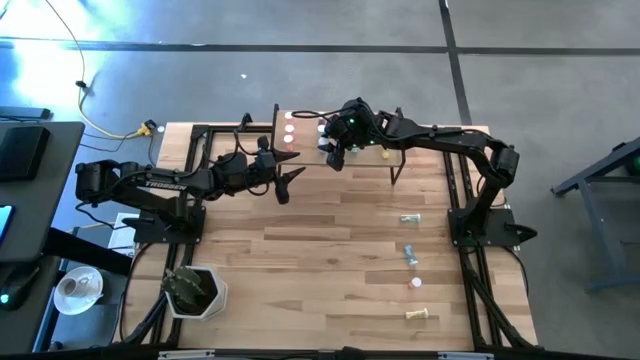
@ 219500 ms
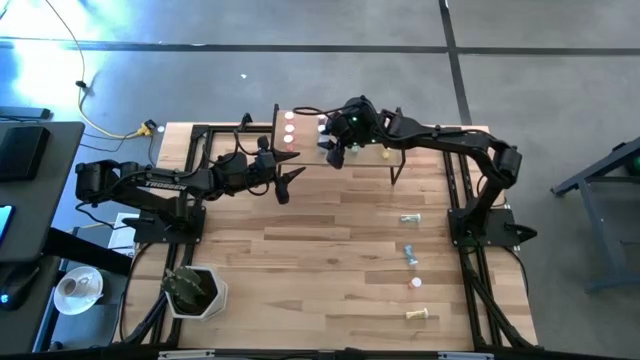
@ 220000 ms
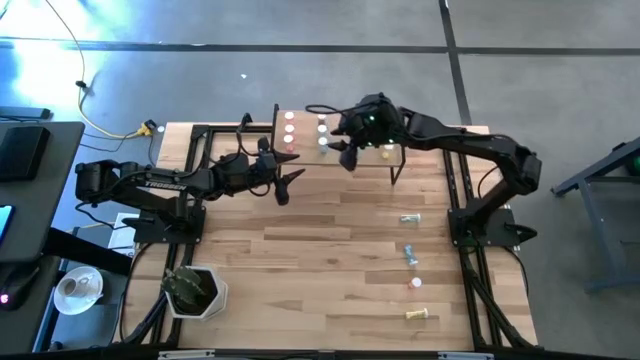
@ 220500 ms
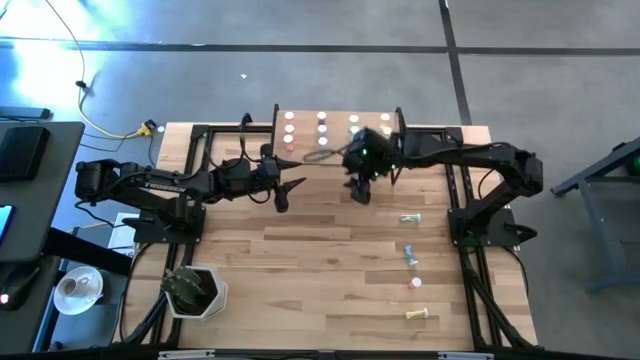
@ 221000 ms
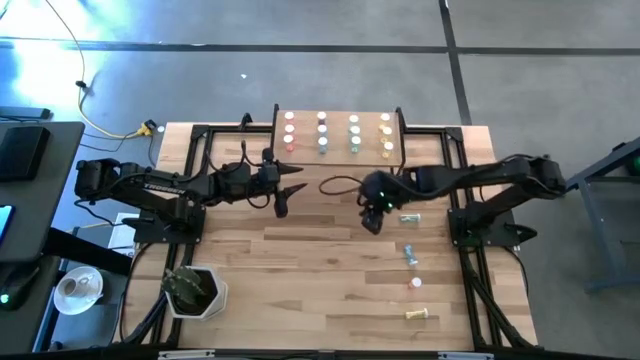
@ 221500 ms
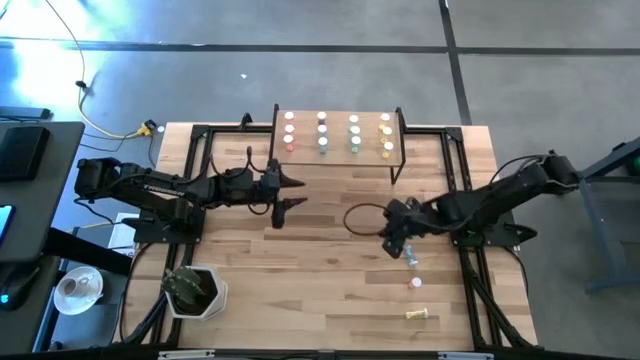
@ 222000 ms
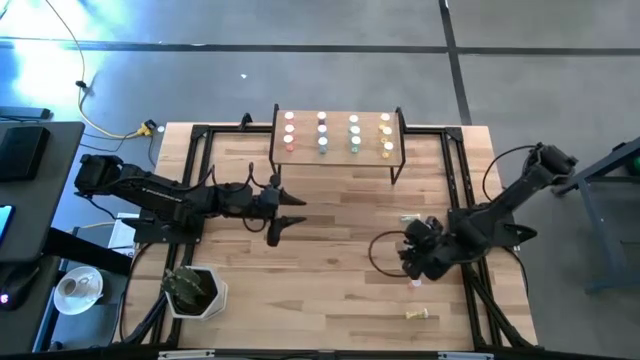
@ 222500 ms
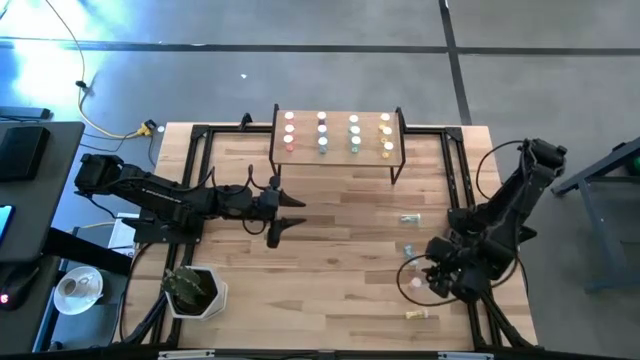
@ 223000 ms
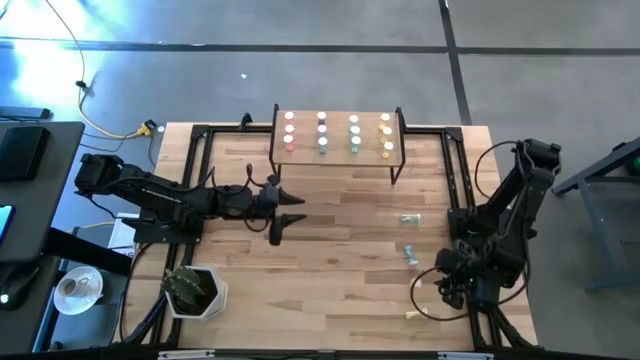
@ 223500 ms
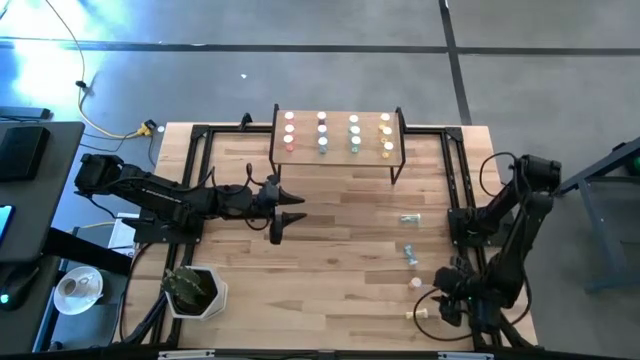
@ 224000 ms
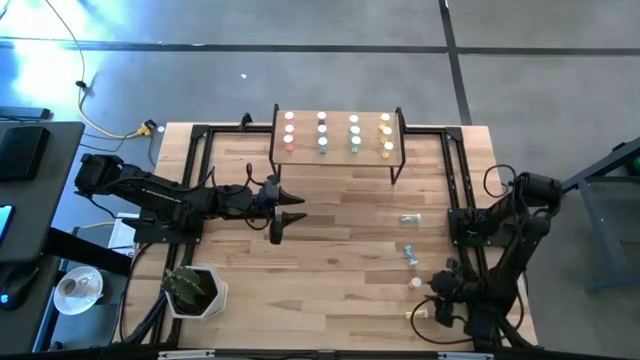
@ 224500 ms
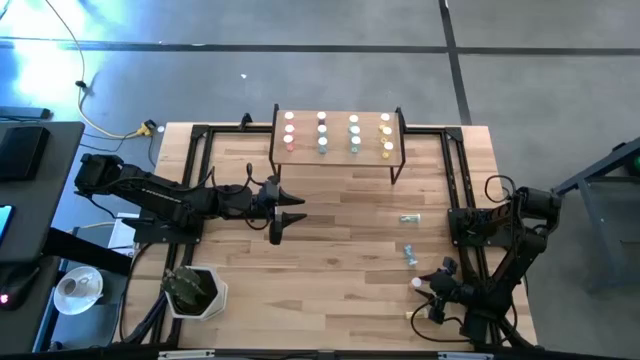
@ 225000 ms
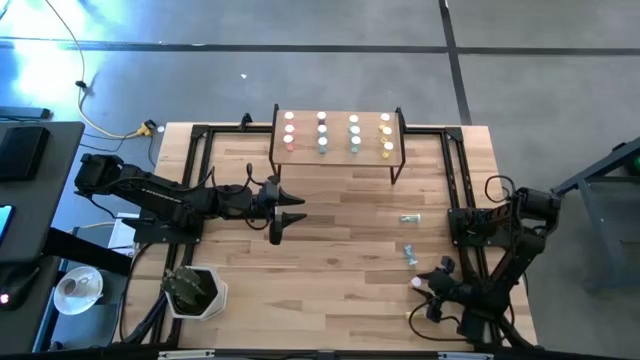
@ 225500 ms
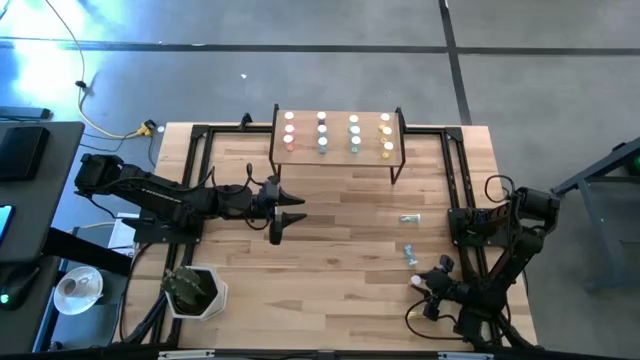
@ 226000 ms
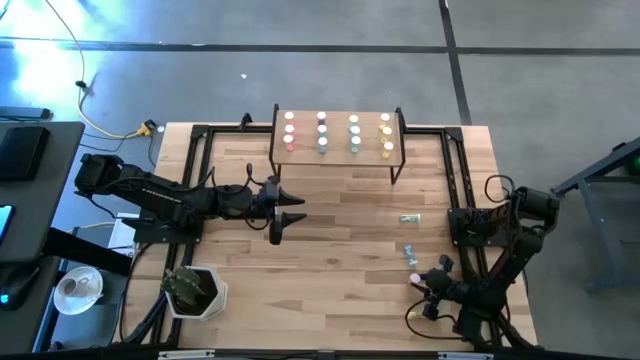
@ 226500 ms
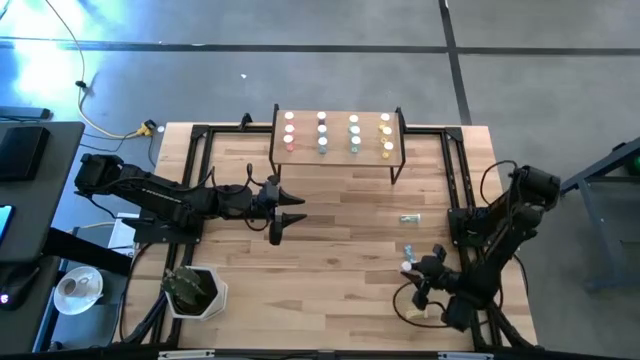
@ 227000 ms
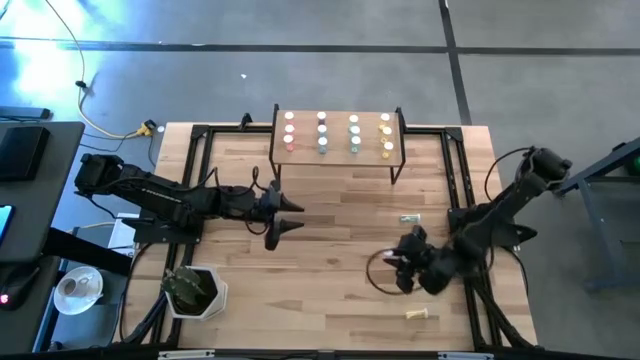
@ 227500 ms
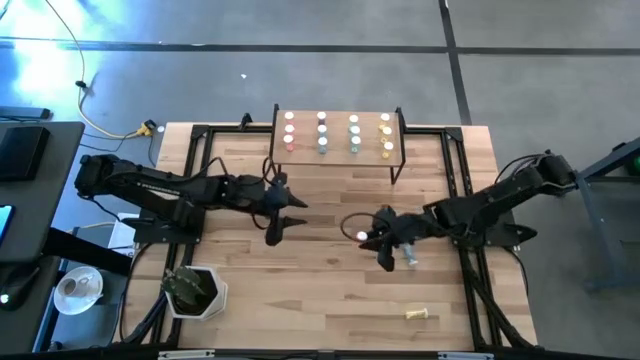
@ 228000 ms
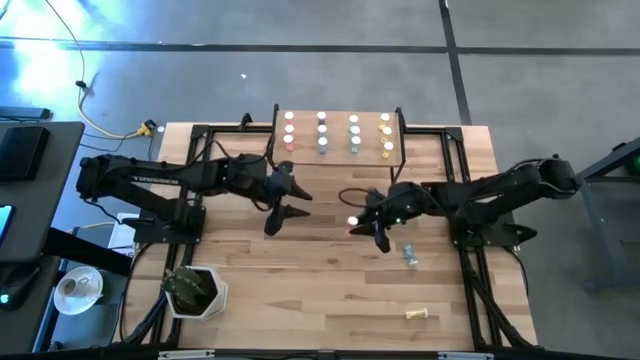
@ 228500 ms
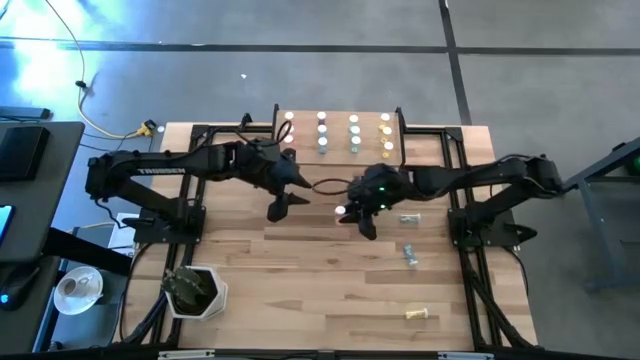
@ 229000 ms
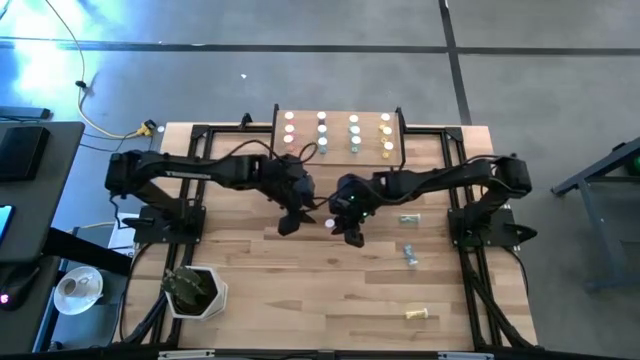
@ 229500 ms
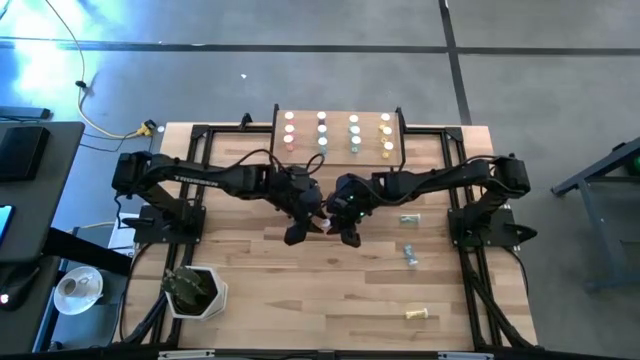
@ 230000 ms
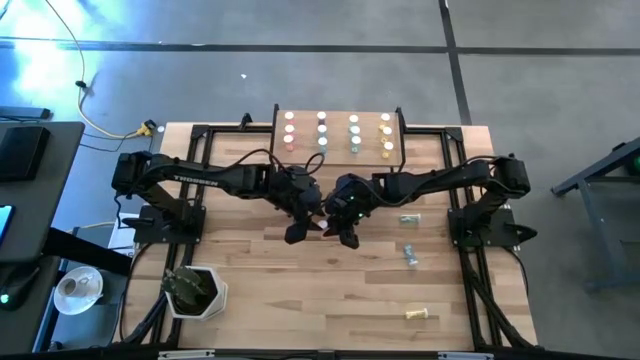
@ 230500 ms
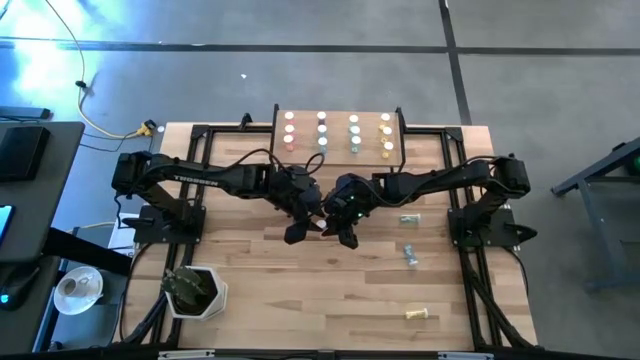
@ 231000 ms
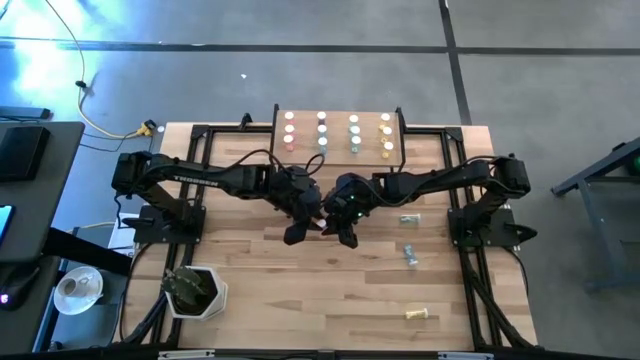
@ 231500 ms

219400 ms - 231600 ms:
Task: Pick and place medicine bottles onto shelf by color
Put the pink pill bottle on the shelf aligned with the other pink pill bottles

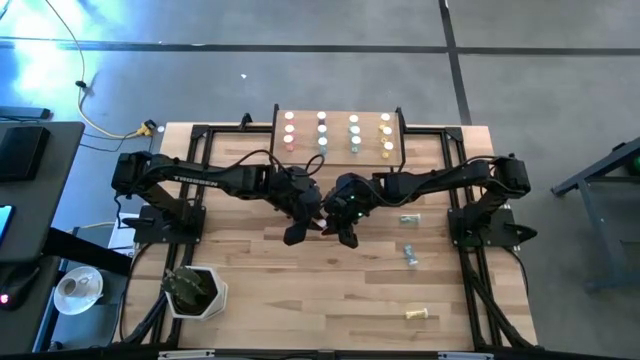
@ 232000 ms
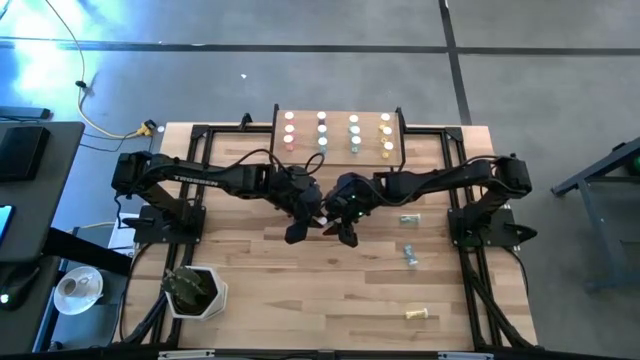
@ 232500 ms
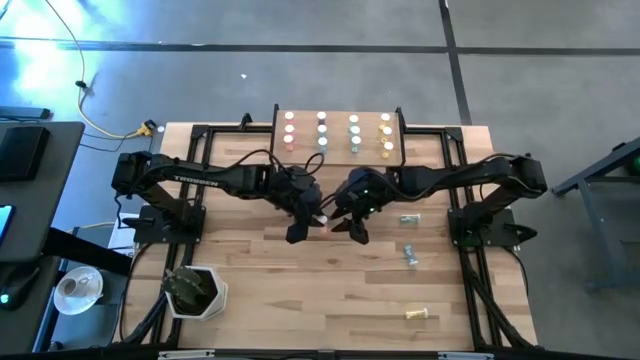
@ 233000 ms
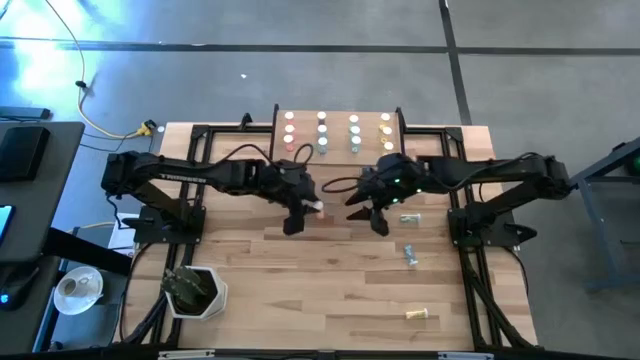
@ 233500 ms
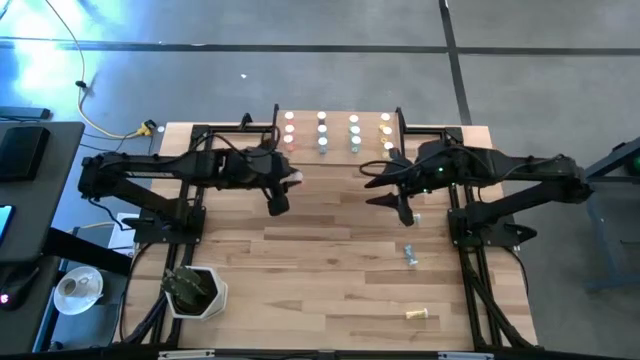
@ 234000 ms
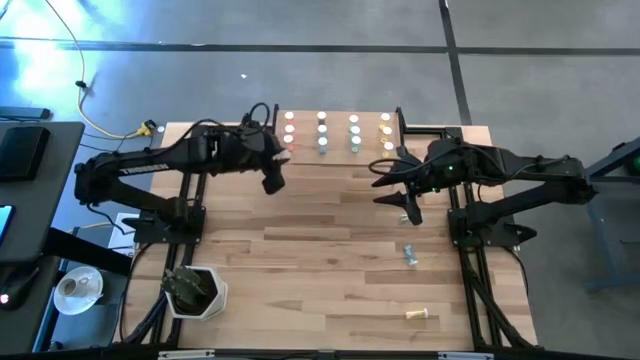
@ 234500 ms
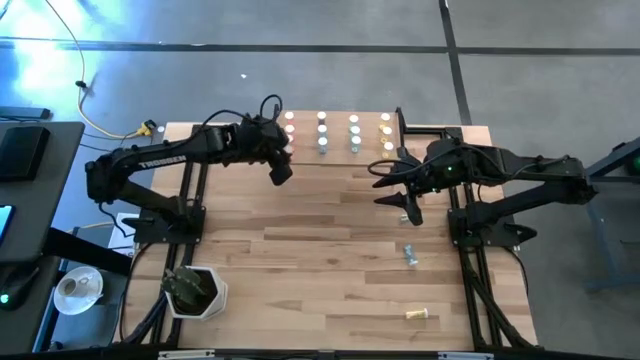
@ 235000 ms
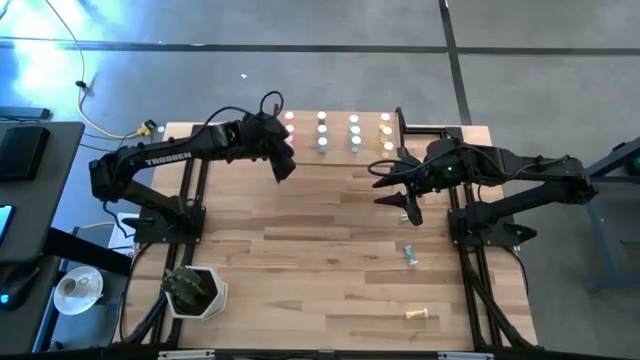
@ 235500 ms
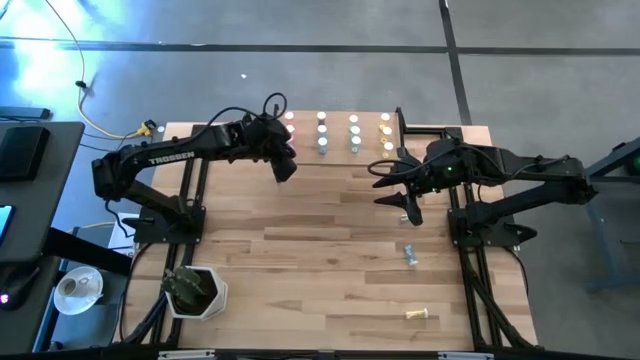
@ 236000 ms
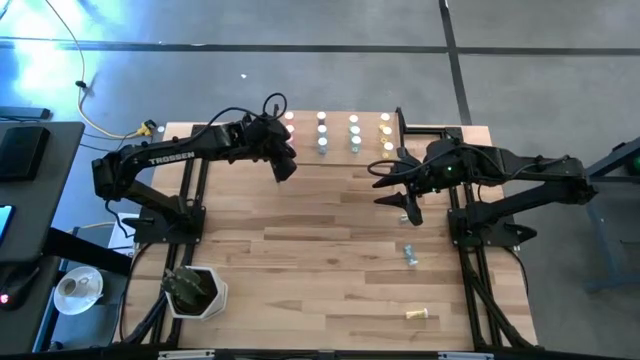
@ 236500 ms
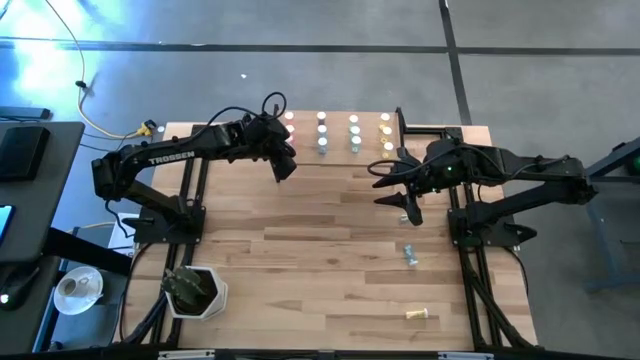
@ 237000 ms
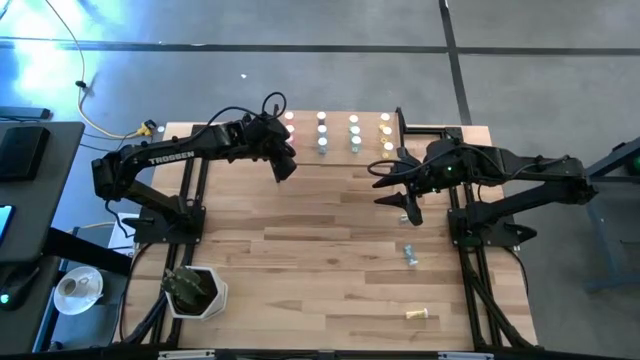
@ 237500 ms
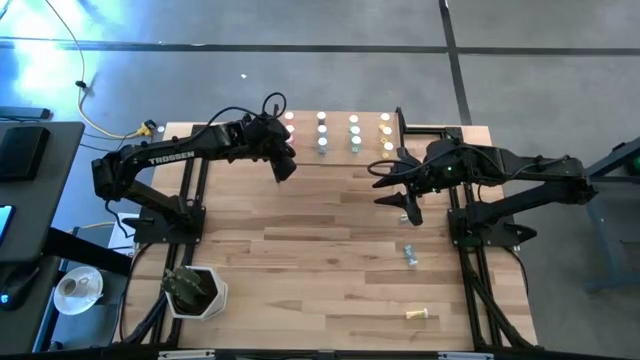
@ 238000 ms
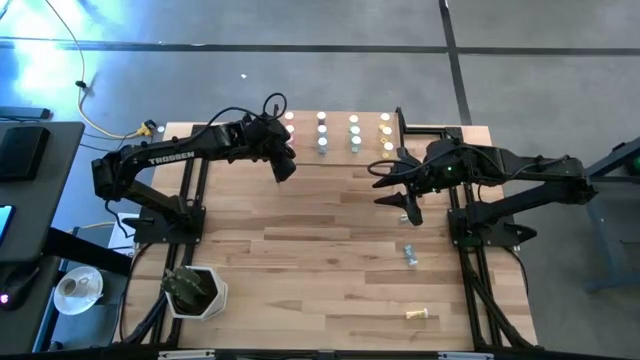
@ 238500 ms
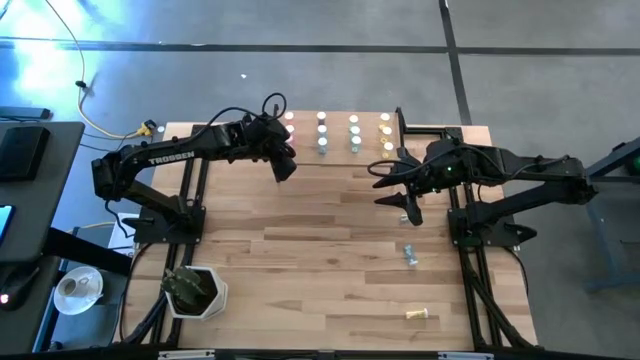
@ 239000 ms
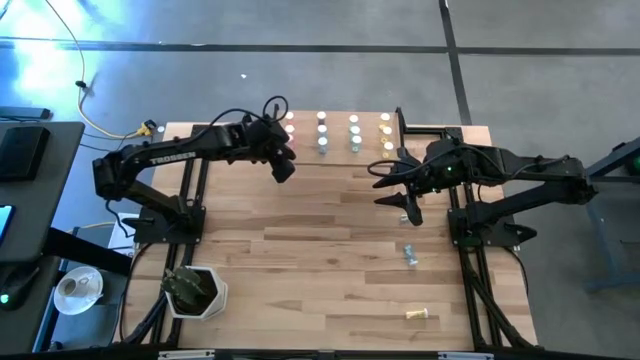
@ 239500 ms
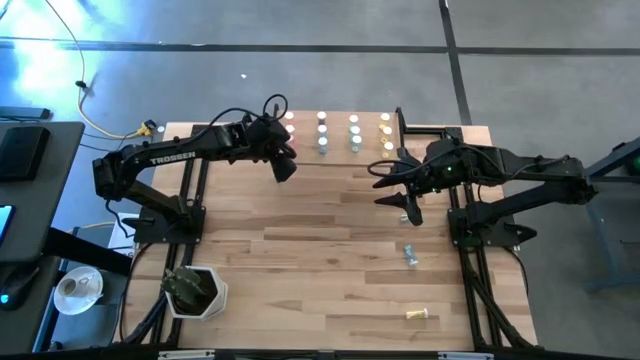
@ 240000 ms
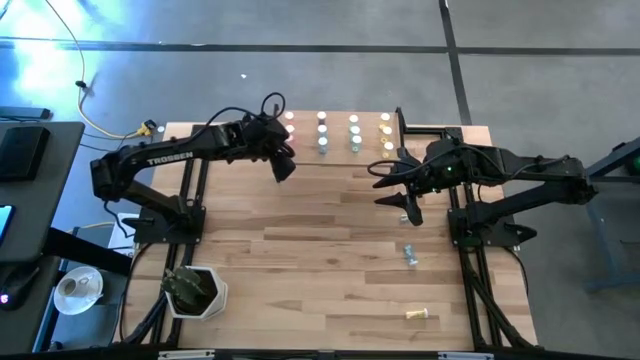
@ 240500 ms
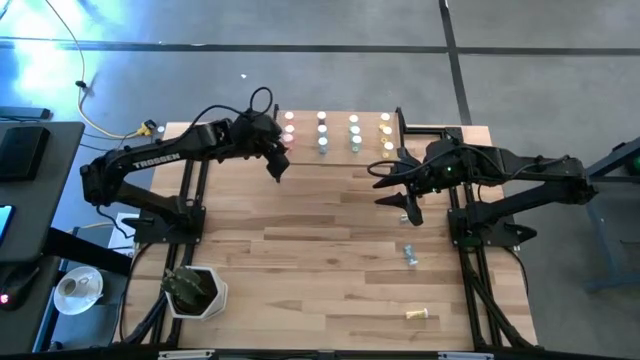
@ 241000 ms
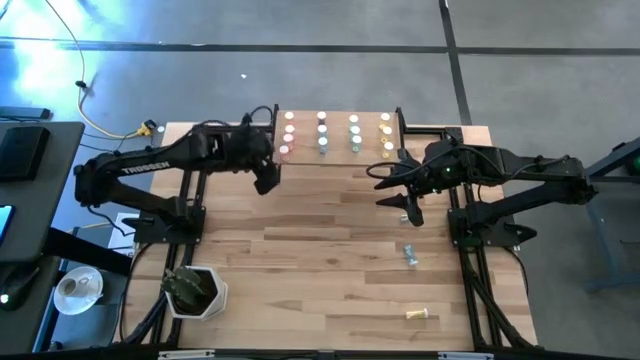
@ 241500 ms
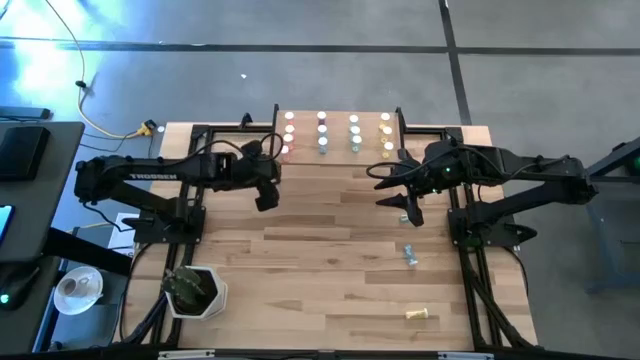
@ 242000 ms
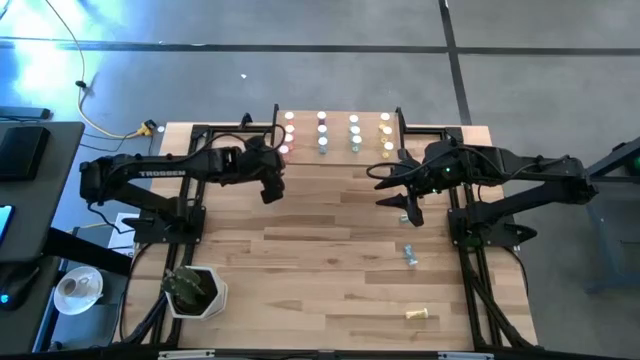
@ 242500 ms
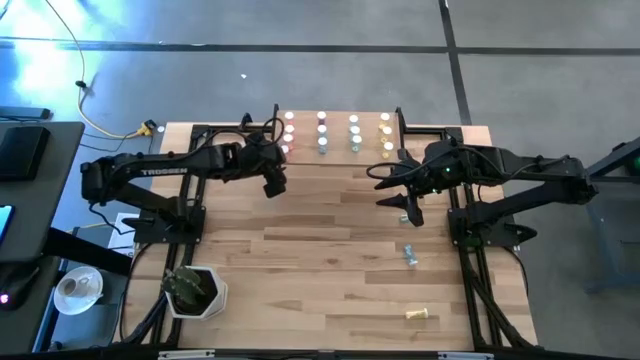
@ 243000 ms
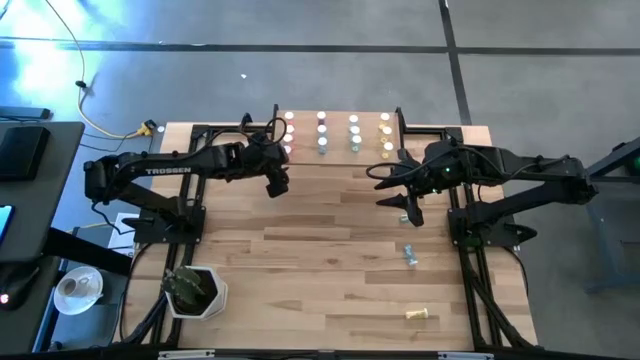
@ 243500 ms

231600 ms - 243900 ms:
Put the pink pill bottle on the shelf aligned with the other pink pill bottles
